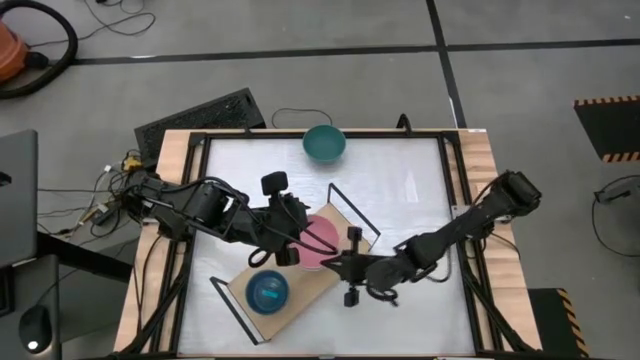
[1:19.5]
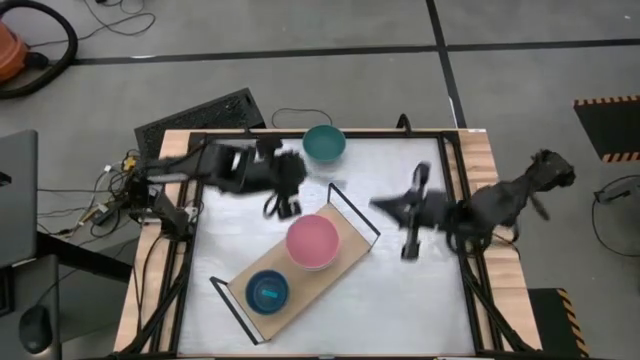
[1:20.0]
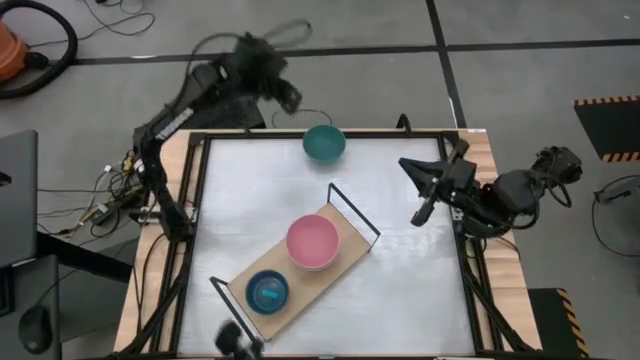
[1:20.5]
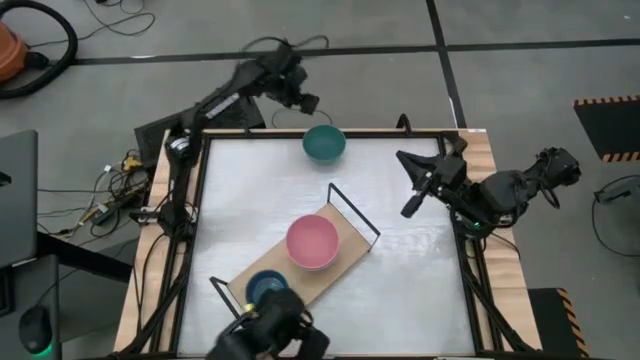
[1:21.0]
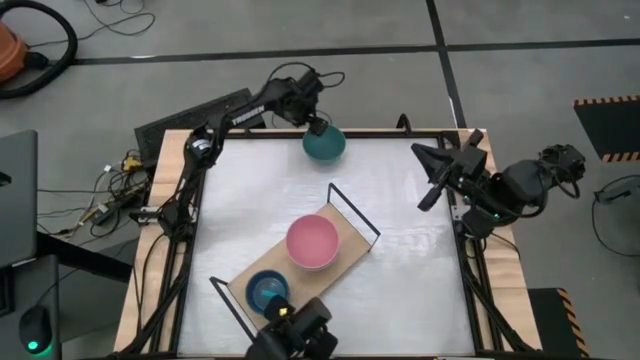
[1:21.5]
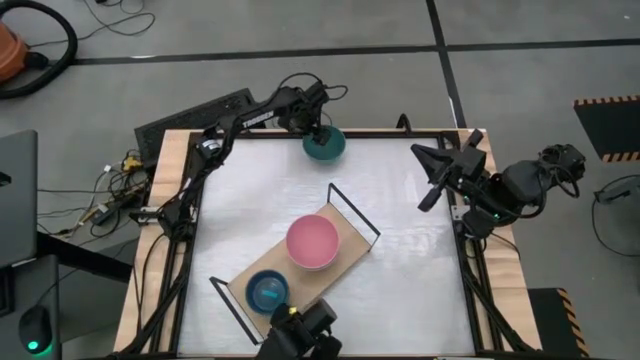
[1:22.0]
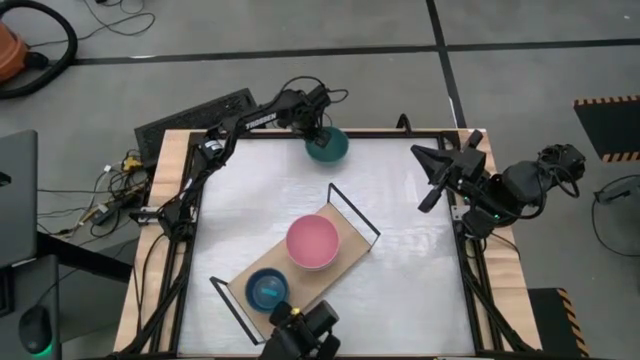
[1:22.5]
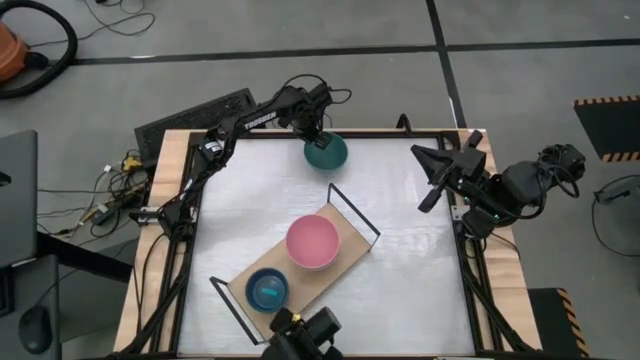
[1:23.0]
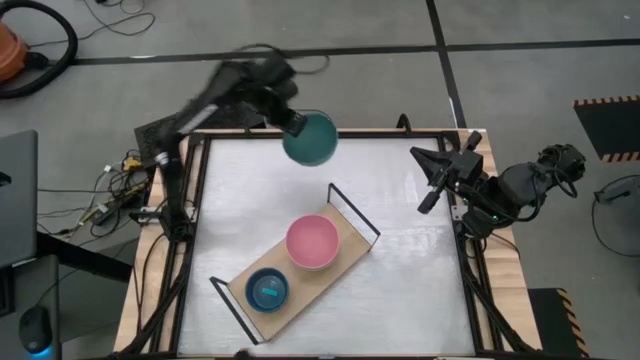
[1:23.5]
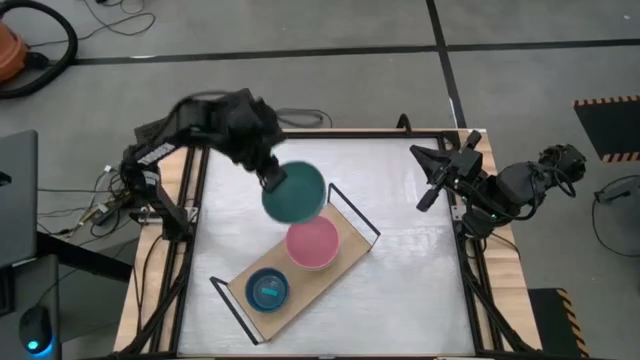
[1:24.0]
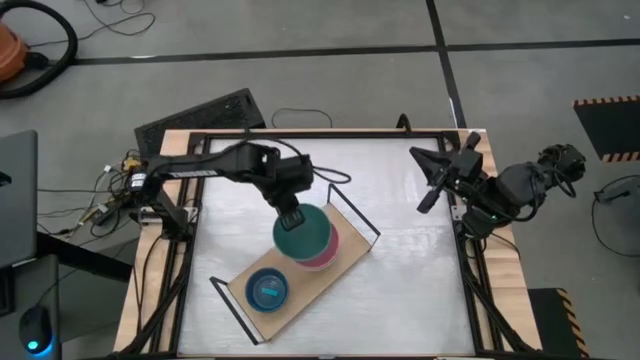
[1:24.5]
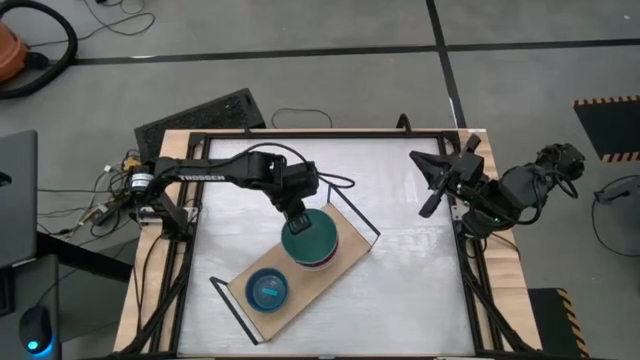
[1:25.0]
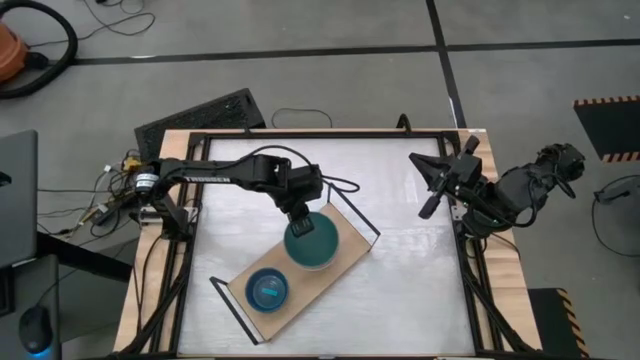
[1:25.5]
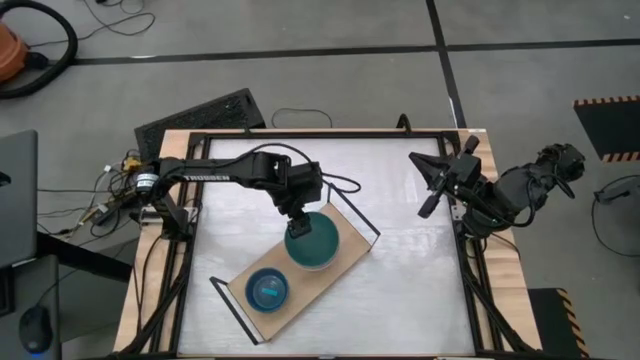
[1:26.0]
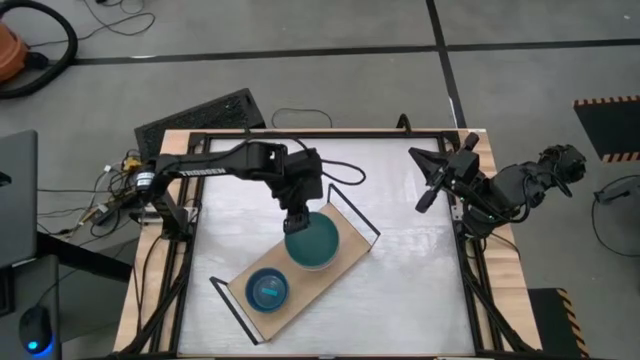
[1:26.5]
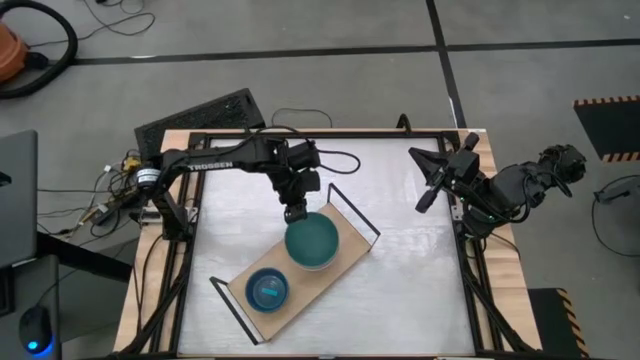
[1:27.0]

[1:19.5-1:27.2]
Task: Place and stack bowls onto a shelf
Stack the green bowl on the top of light pink bowl on the shelf

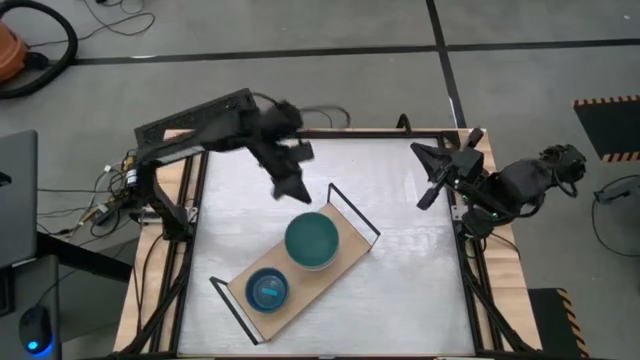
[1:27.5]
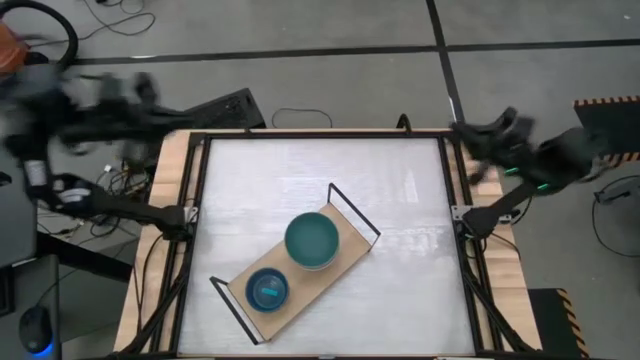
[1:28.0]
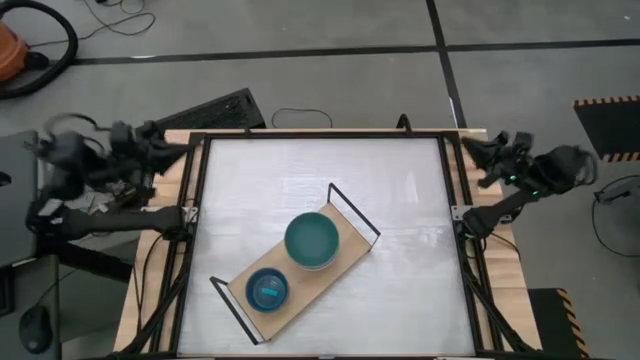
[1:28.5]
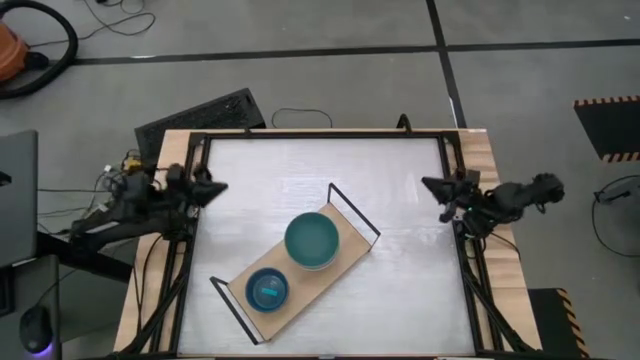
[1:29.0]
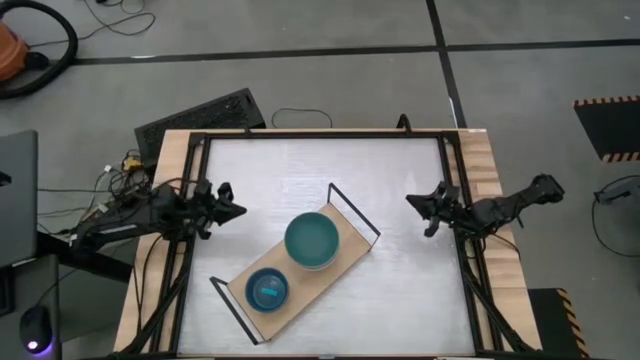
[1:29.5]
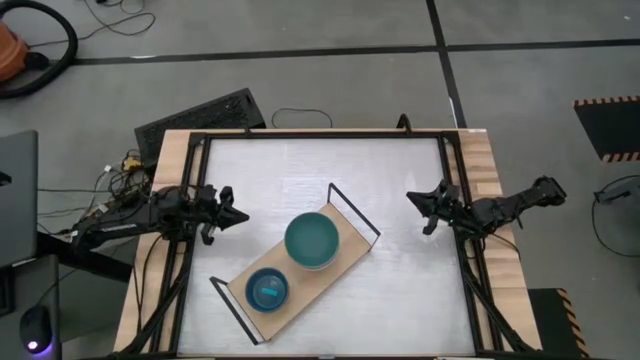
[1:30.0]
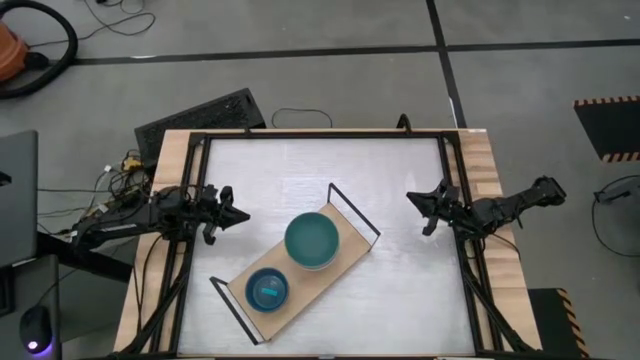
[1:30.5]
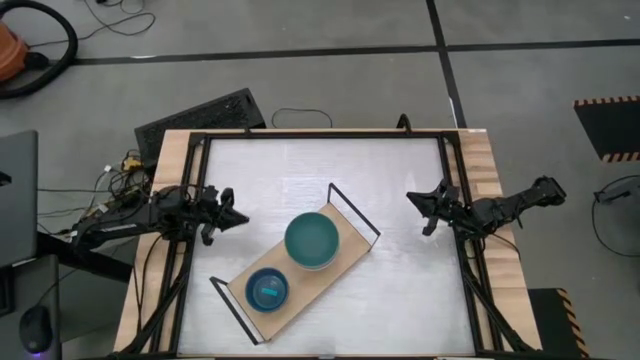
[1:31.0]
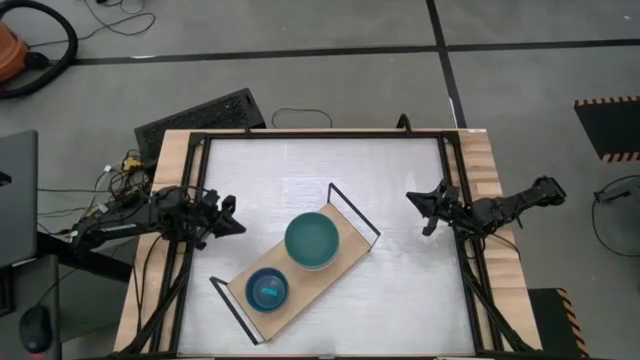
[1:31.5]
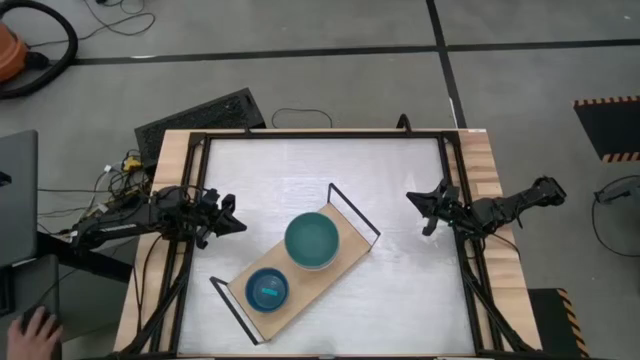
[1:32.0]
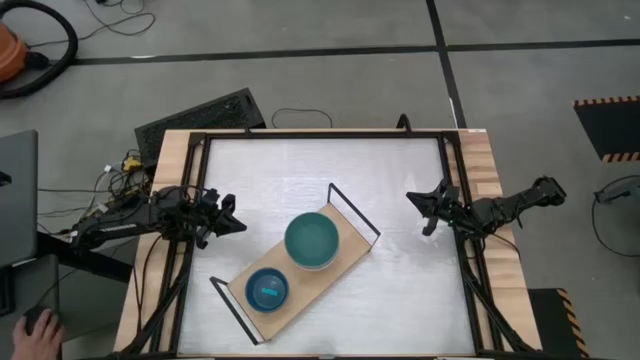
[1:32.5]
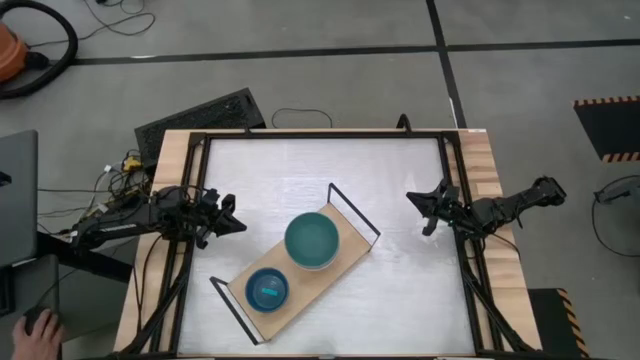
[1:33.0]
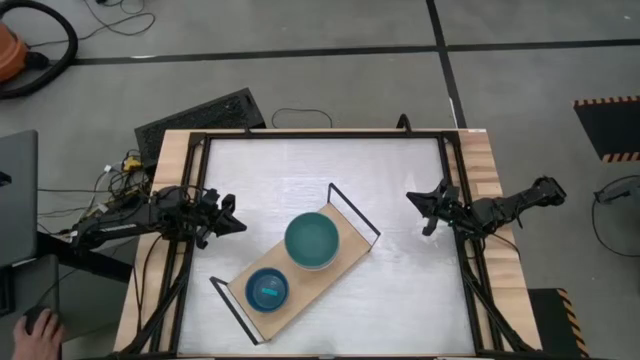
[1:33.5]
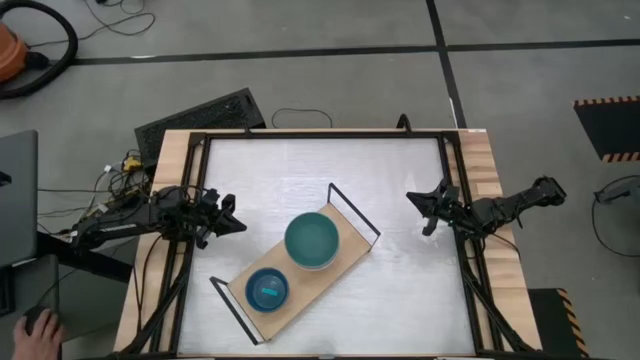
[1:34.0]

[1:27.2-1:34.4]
Return to Home Position

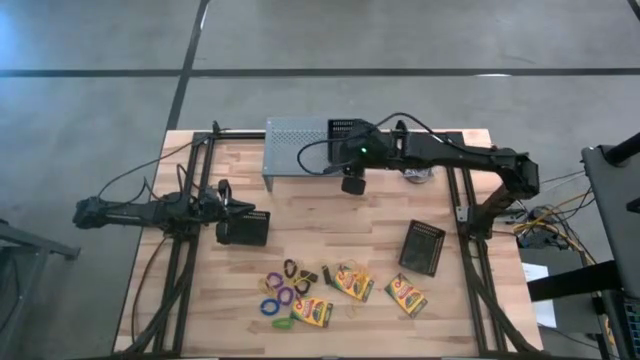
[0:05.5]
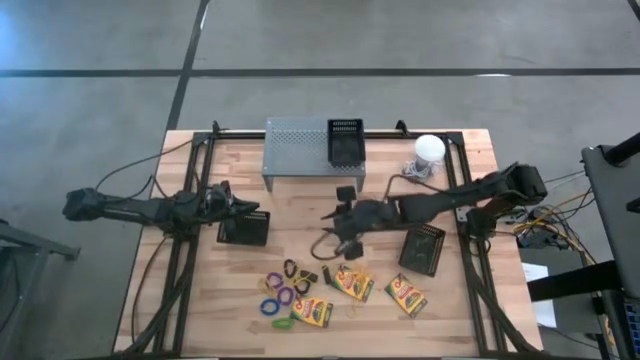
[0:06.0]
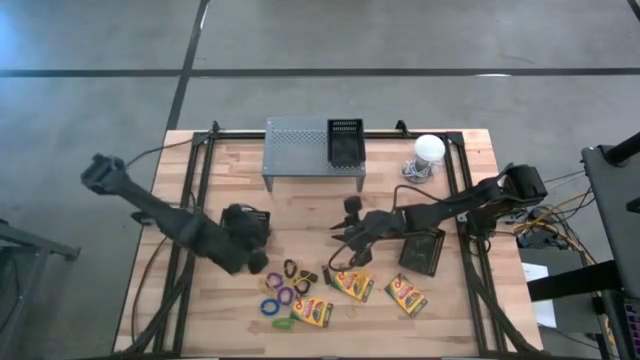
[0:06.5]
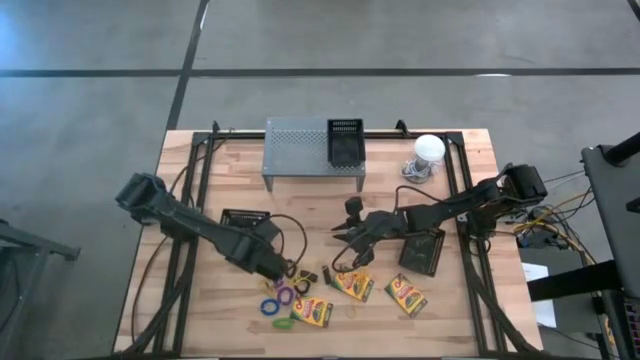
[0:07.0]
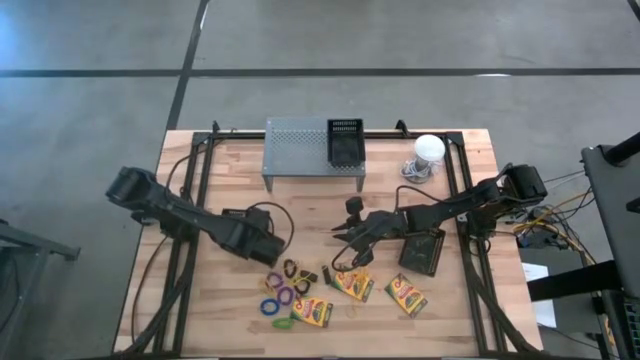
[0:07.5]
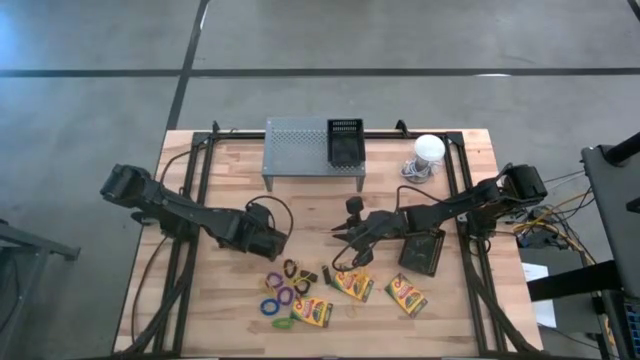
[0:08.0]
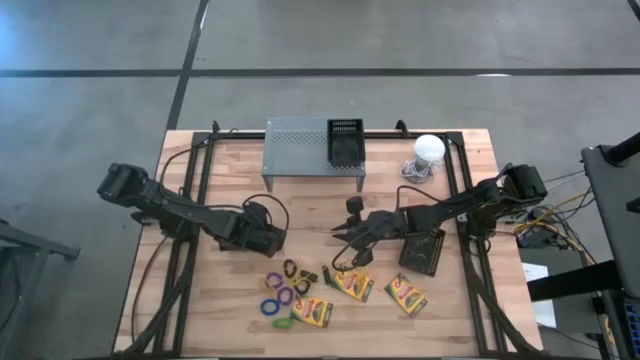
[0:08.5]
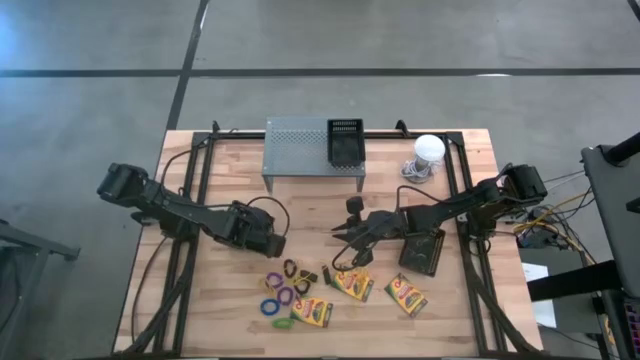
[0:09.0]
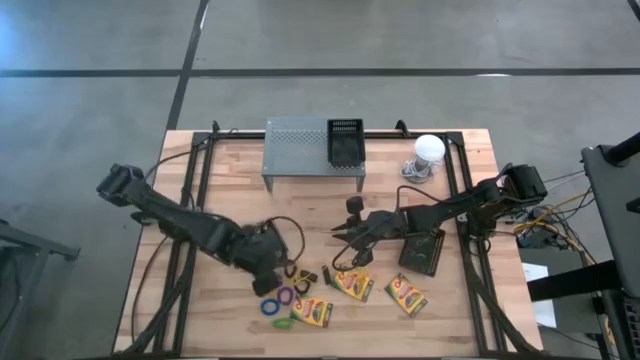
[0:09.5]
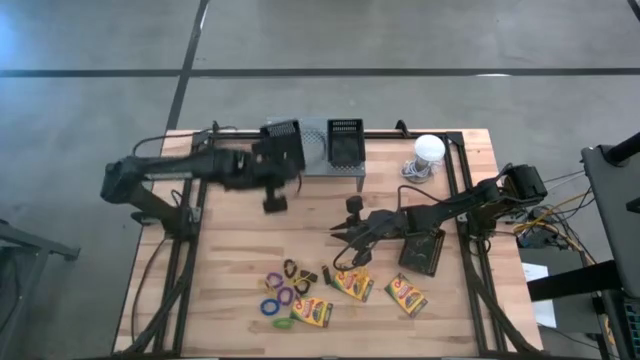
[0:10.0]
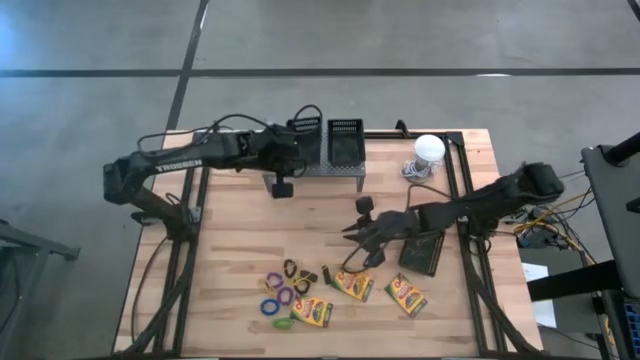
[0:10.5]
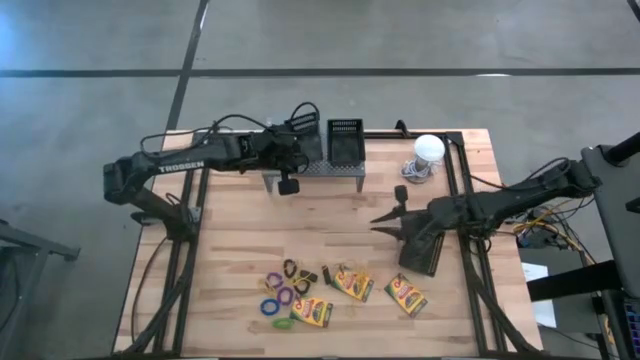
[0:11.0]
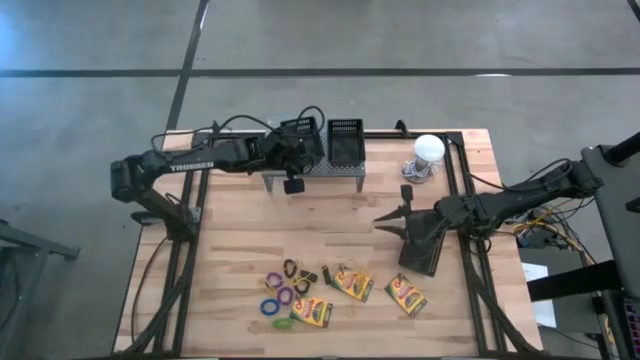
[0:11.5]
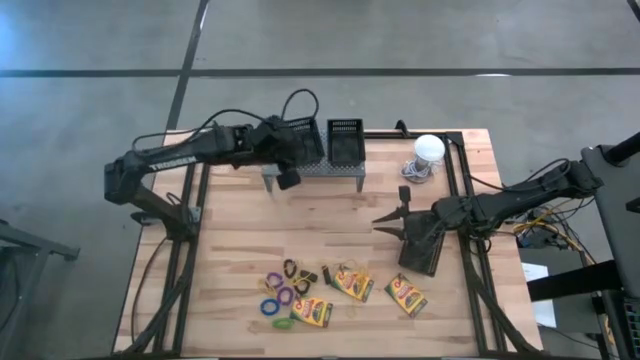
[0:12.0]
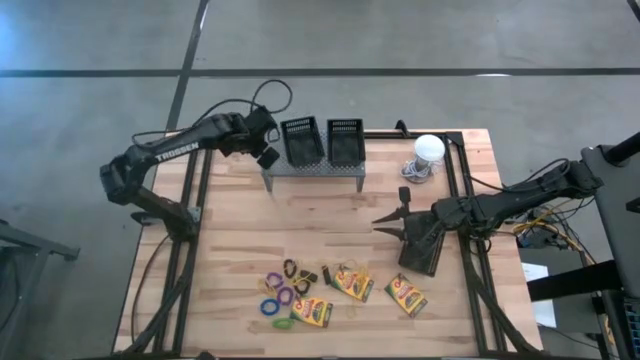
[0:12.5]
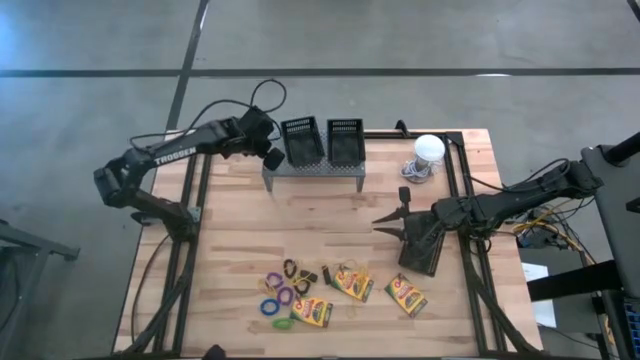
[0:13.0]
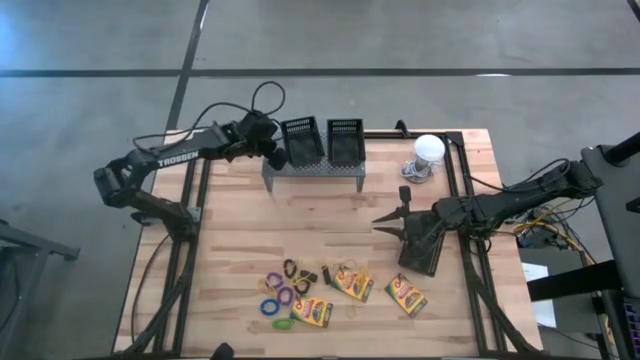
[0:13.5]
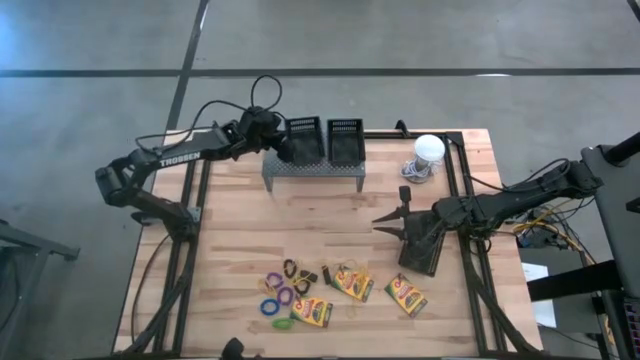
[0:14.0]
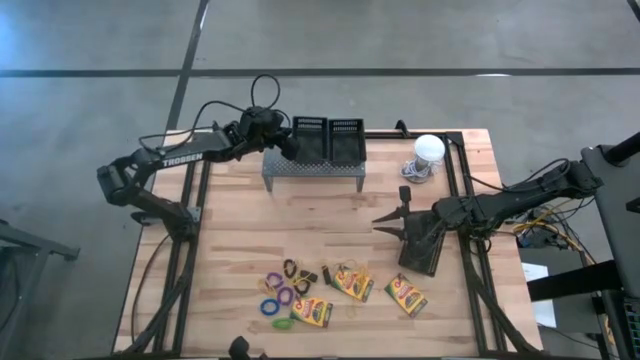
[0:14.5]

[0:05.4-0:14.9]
Task: Pick & Place Office Desk Supplies
Put the black basket on the shelf
